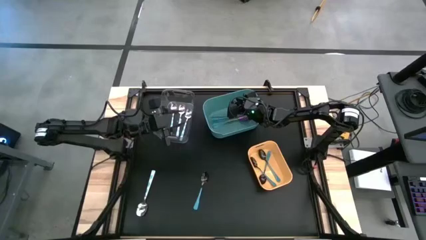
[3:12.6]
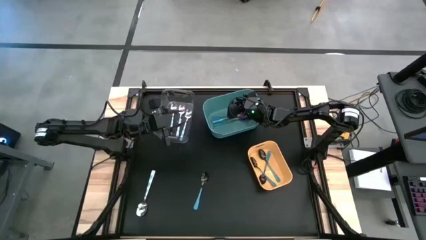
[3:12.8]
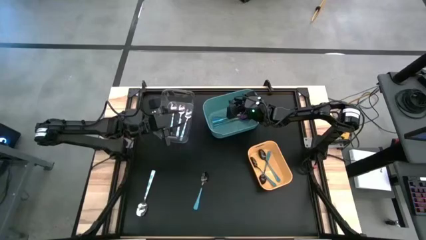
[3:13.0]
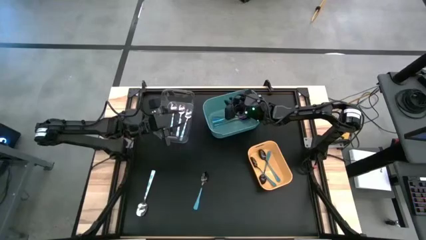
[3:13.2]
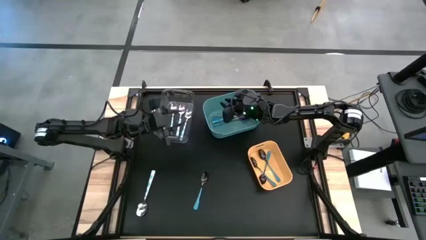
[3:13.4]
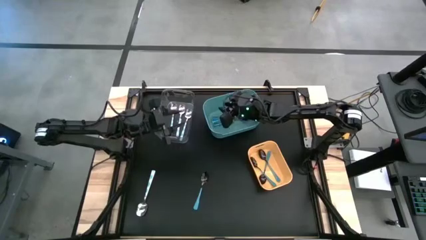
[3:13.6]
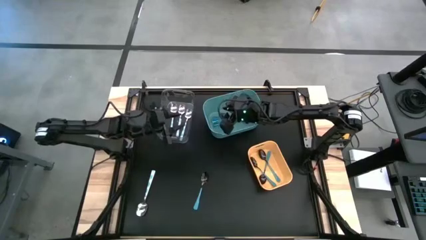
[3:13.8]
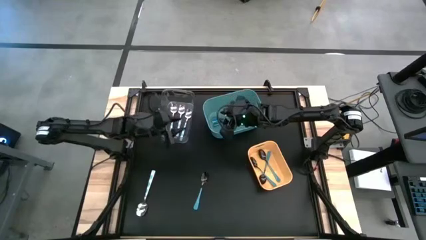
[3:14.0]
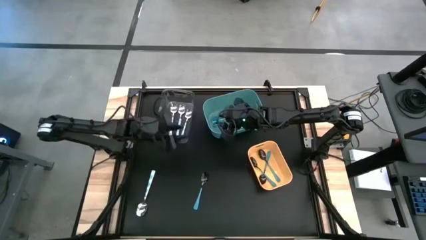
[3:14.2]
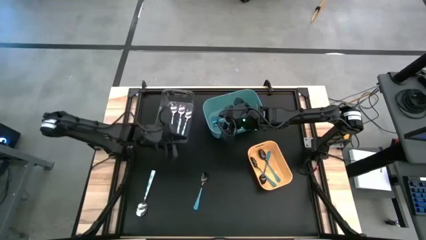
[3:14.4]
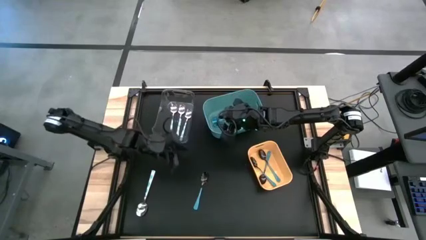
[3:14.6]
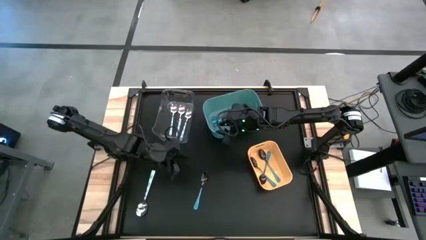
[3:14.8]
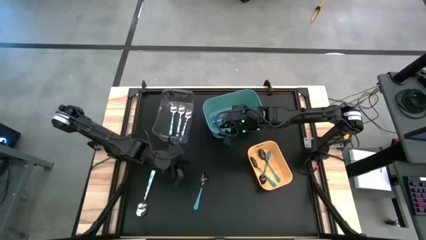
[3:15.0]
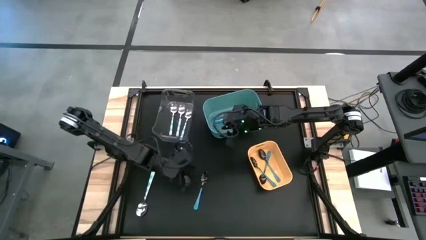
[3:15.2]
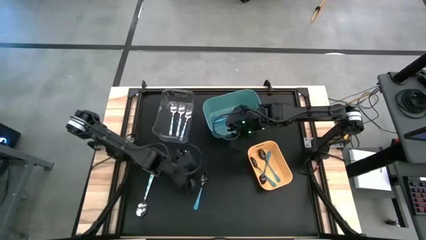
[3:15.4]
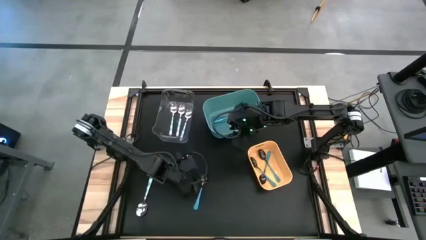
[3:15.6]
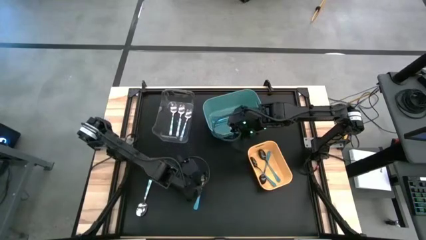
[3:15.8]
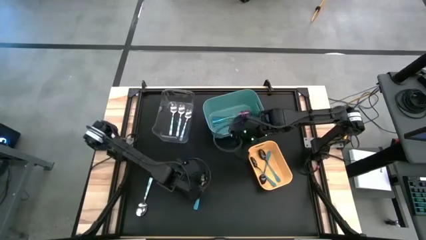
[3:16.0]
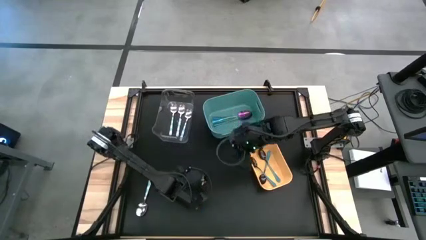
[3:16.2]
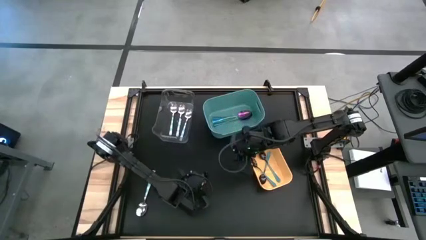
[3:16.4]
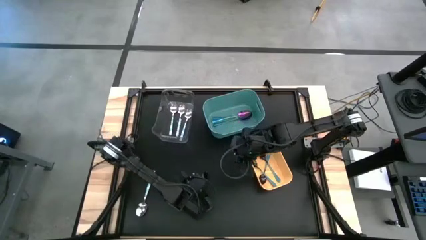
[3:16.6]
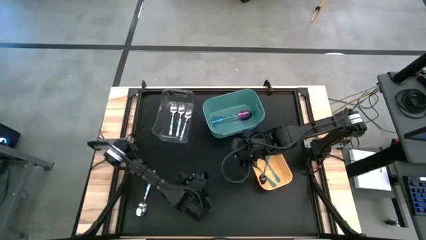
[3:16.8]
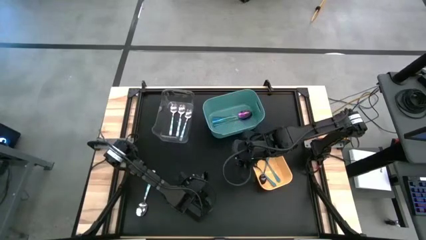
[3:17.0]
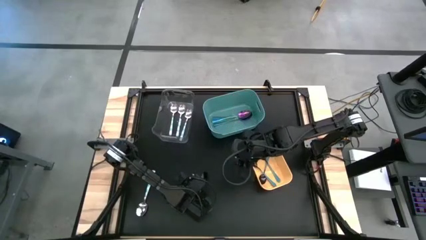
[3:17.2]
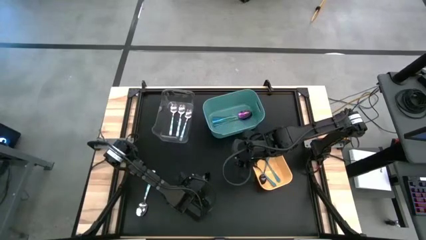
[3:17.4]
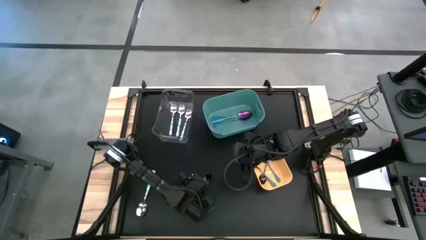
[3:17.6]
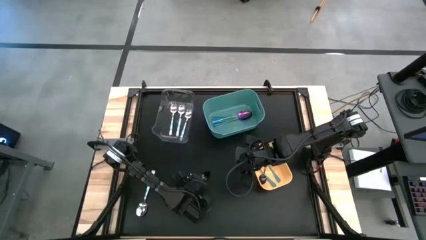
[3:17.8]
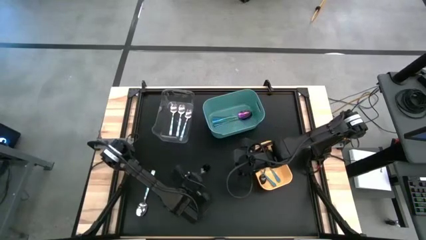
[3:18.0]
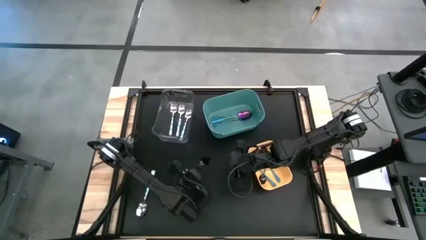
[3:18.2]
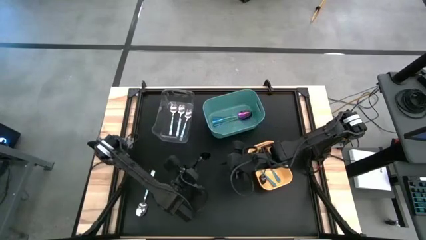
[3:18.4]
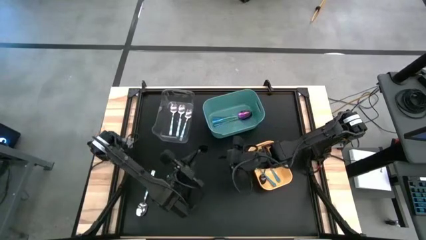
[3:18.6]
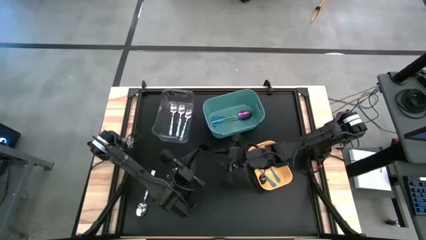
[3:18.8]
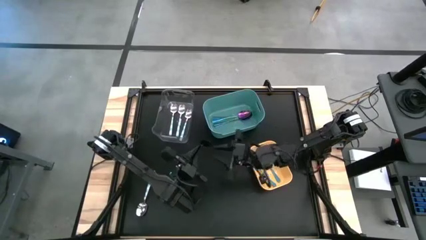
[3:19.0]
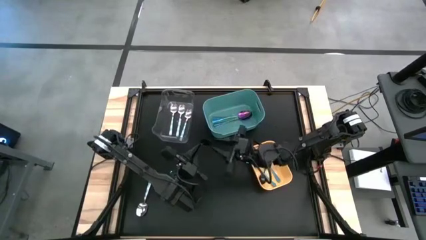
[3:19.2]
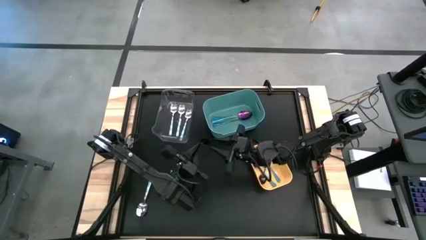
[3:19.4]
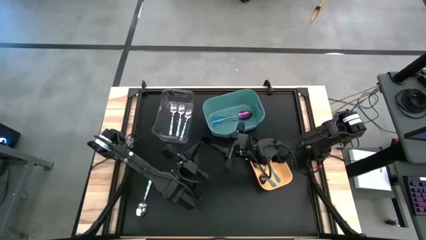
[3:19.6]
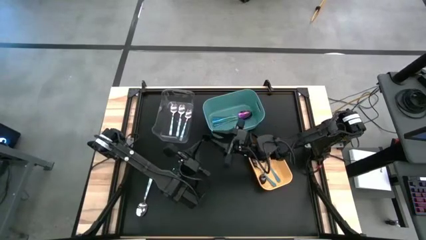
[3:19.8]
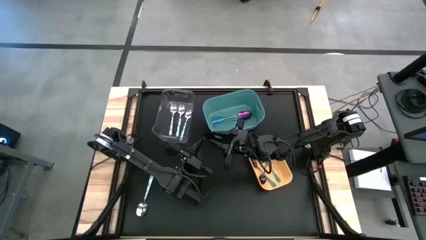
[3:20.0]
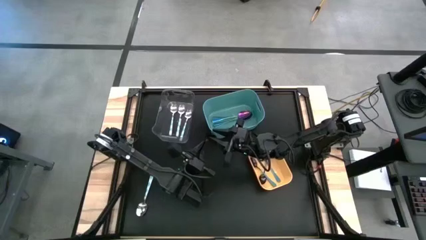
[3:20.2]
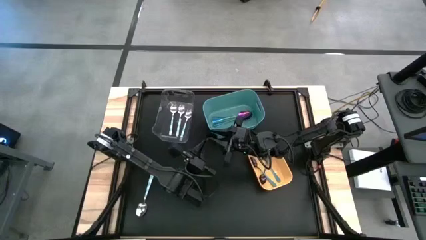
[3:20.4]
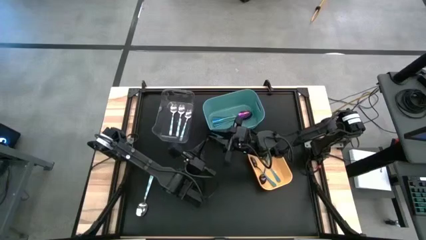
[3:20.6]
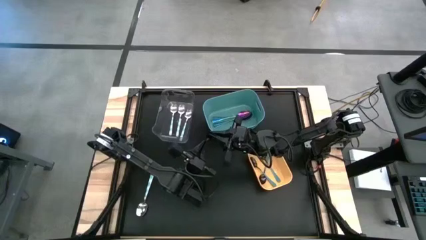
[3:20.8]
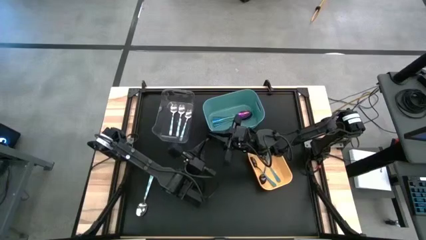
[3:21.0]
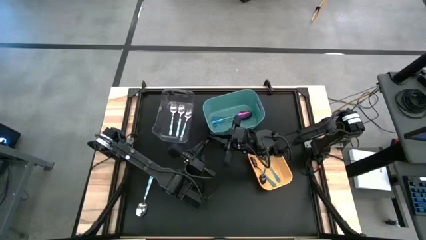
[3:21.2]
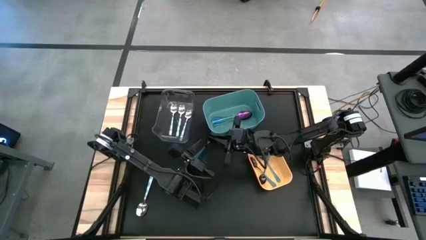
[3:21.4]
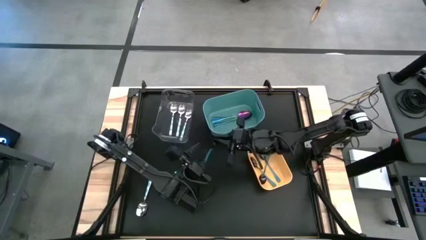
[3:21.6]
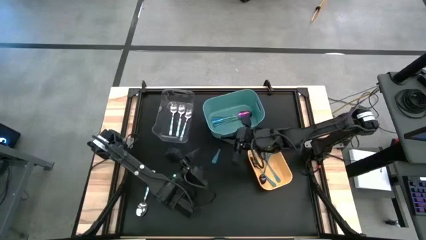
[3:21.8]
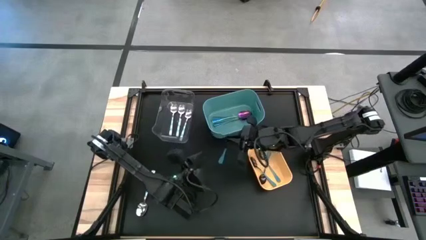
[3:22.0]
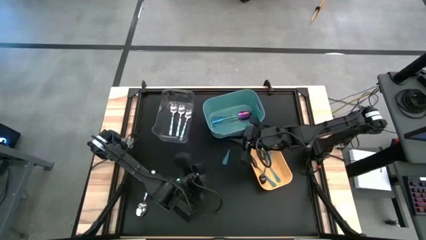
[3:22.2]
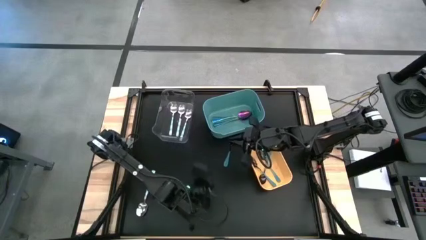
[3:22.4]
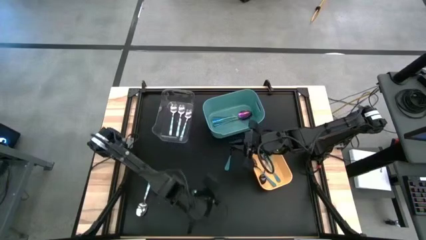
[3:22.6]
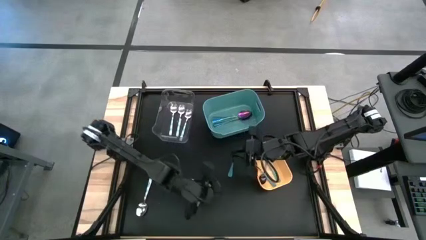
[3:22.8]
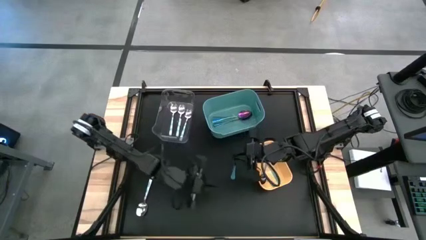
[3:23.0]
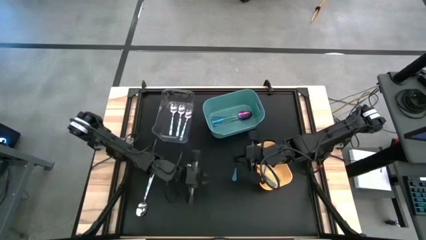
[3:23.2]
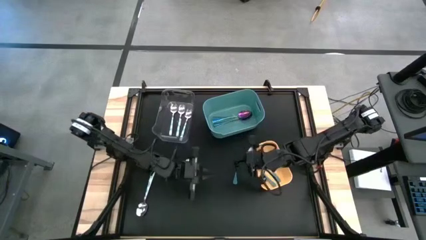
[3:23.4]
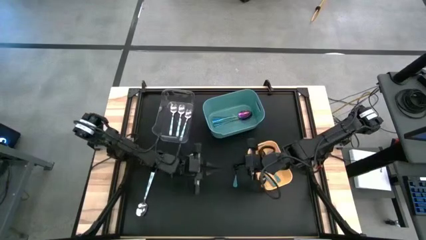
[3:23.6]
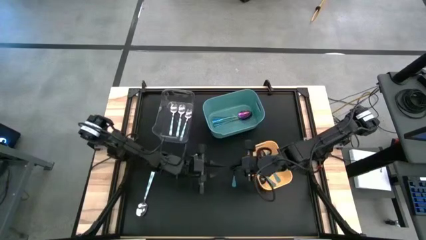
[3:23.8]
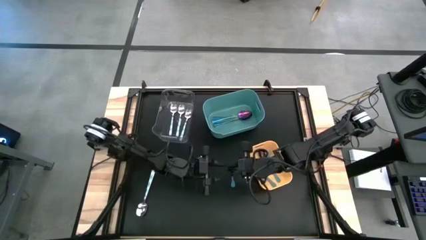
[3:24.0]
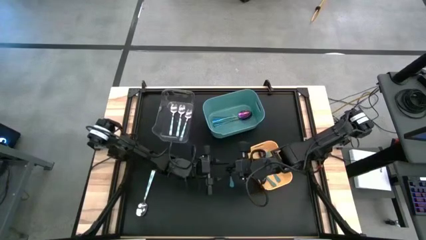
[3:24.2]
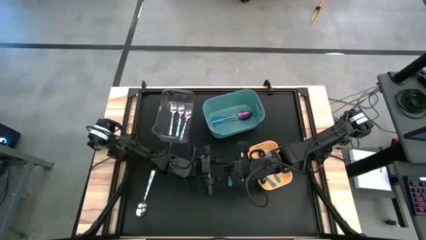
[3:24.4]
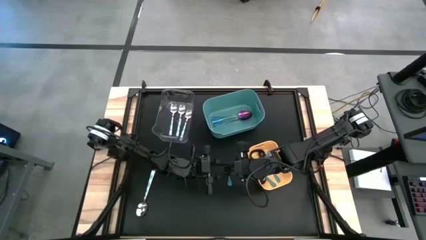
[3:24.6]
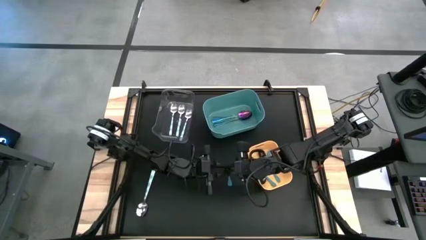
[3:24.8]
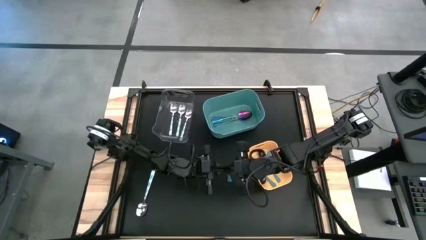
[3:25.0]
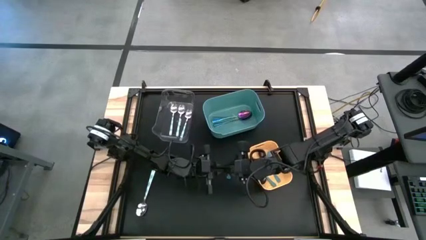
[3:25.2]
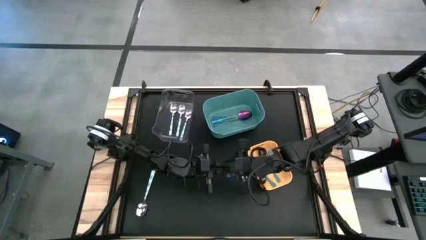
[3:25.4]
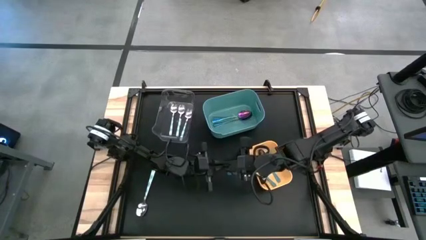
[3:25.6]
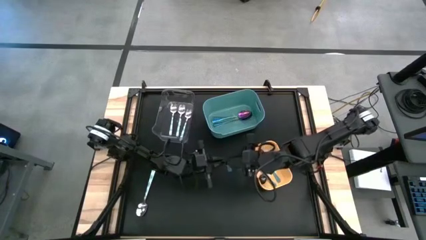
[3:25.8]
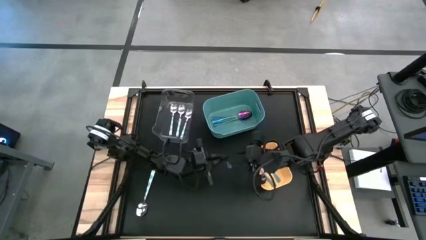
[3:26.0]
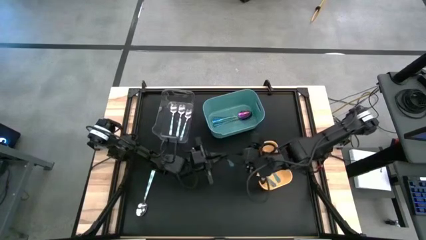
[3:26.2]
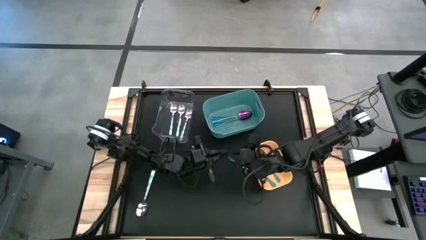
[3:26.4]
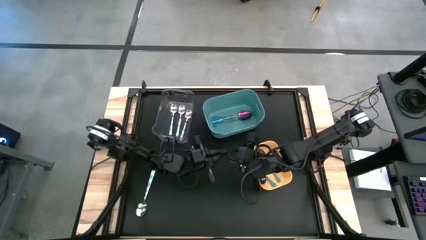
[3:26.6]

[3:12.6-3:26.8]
Task: Sort silverware by color (type)
Put the black spoon into the yellow bin

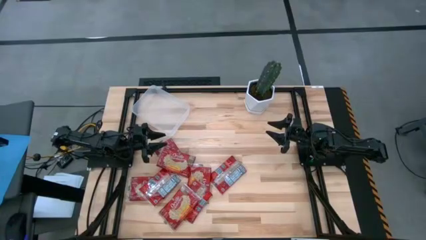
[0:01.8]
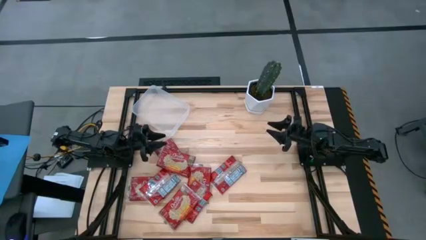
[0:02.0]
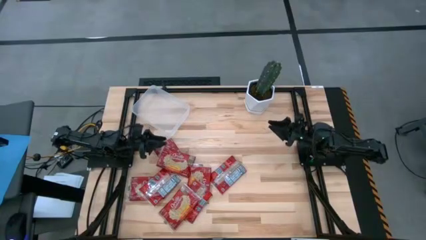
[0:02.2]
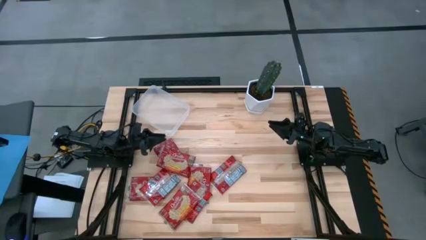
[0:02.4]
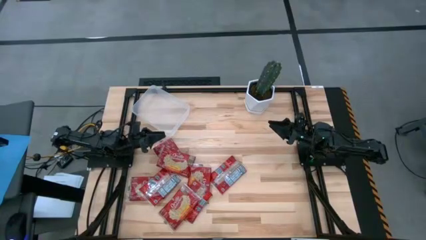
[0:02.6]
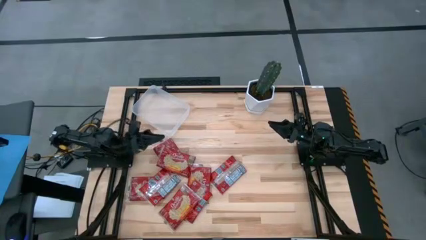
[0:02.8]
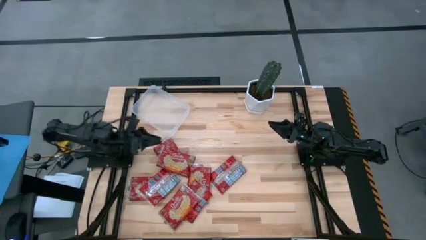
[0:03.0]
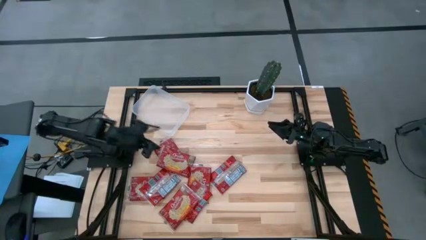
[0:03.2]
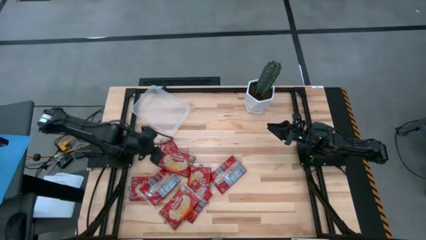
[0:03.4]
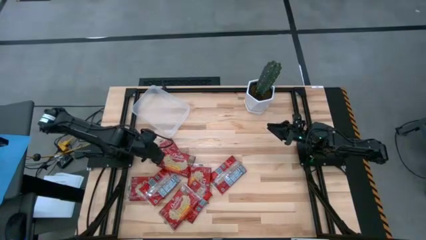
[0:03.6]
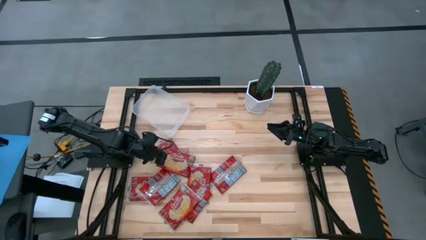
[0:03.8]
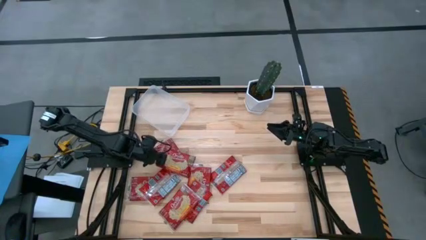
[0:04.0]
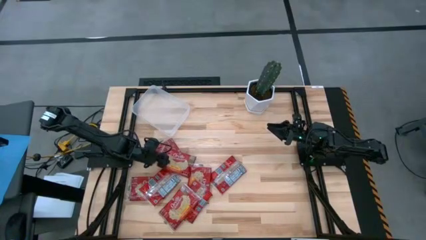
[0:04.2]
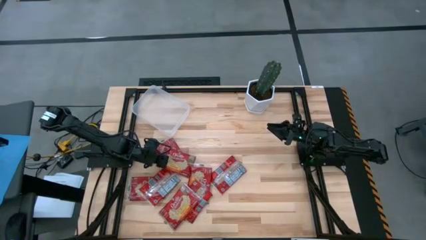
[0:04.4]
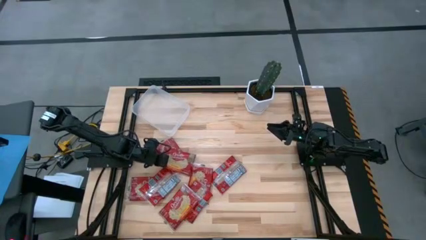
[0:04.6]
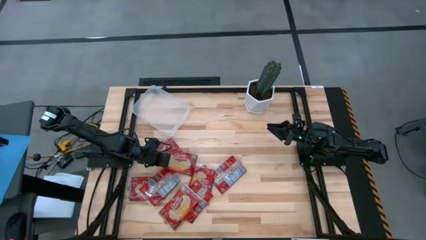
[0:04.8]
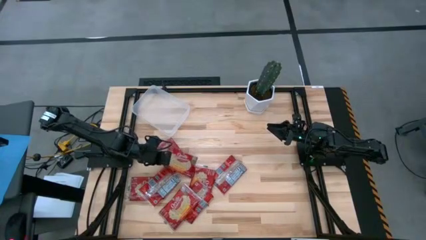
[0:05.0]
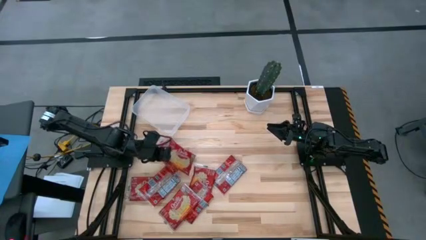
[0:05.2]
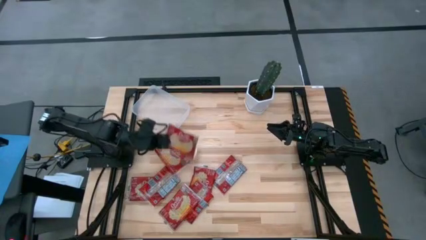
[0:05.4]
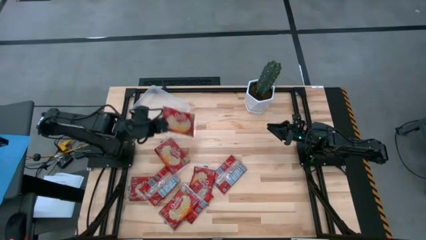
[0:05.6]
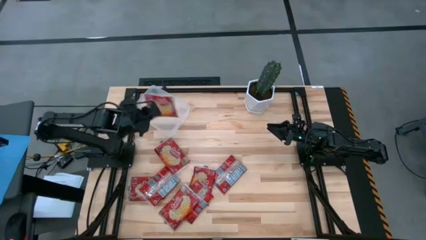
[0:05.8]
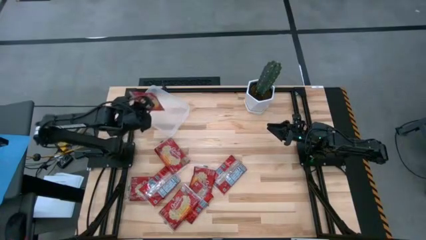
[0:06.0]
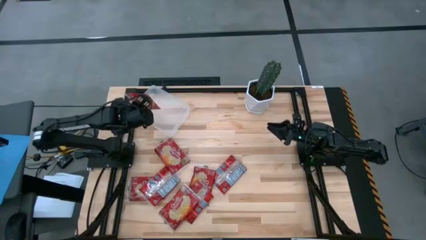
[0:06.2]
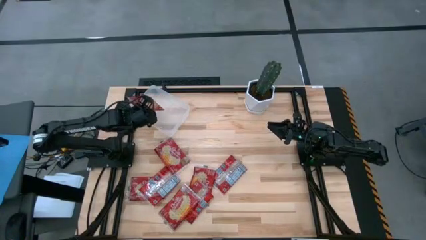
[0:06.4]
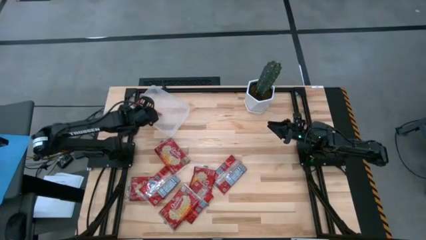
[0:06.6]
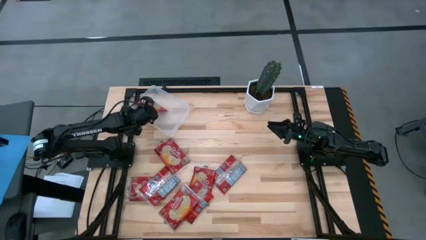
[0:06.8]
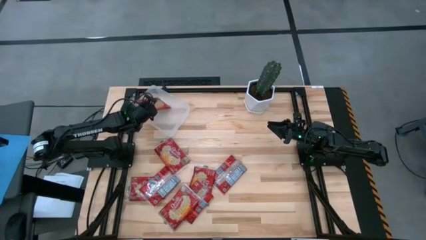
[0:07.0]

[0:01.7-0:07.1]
Task: Sort popcorn bags into baskets
Put the red popcorn bag into the transparent bin
